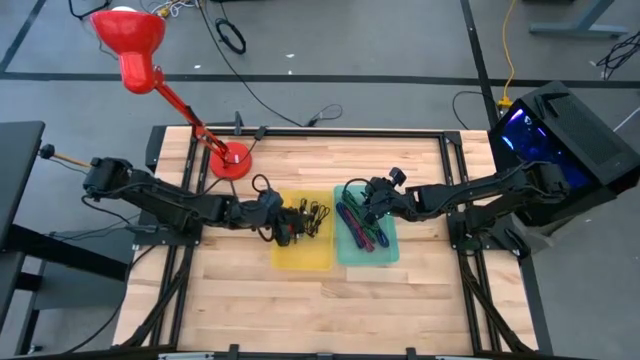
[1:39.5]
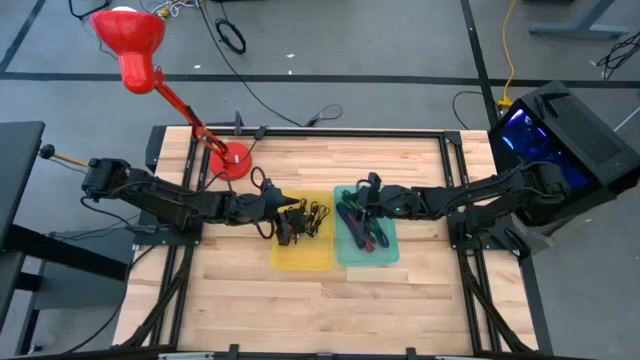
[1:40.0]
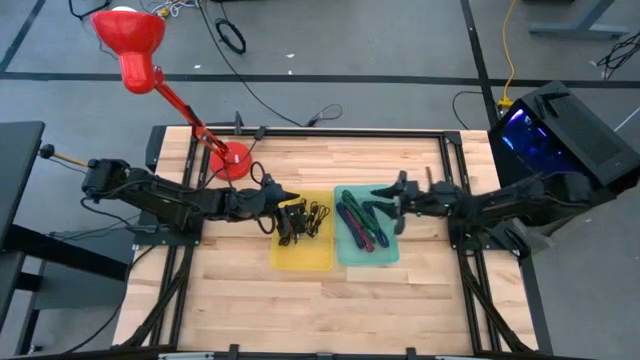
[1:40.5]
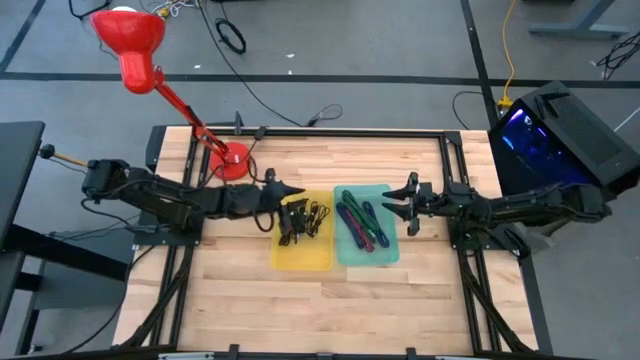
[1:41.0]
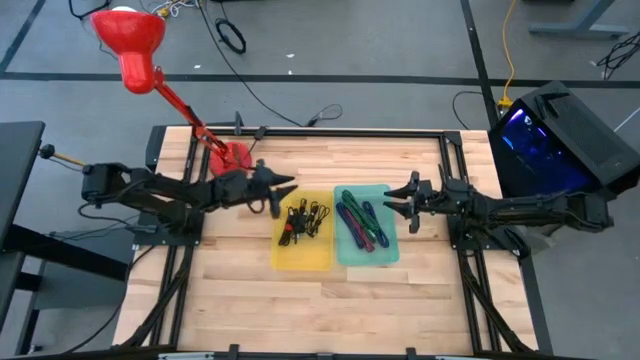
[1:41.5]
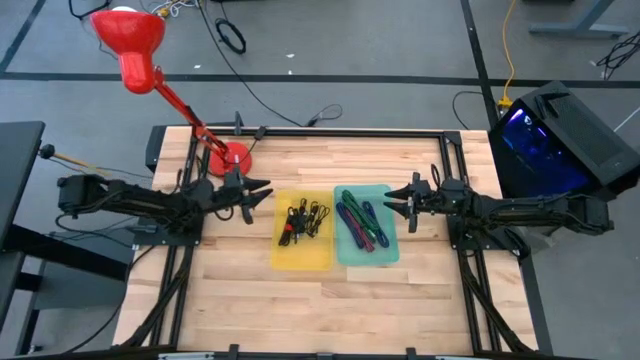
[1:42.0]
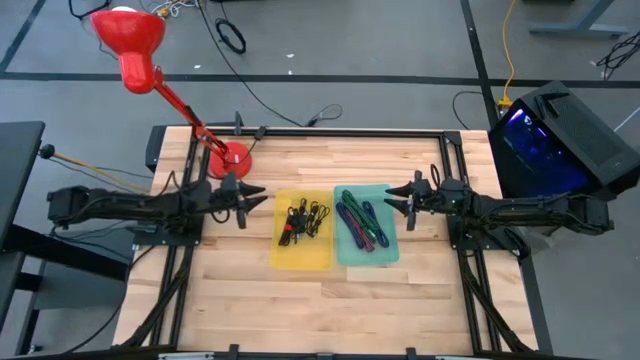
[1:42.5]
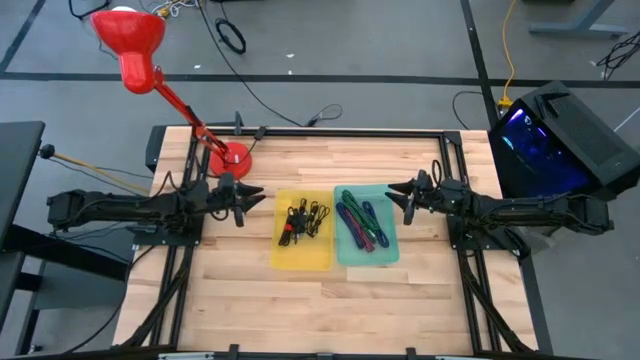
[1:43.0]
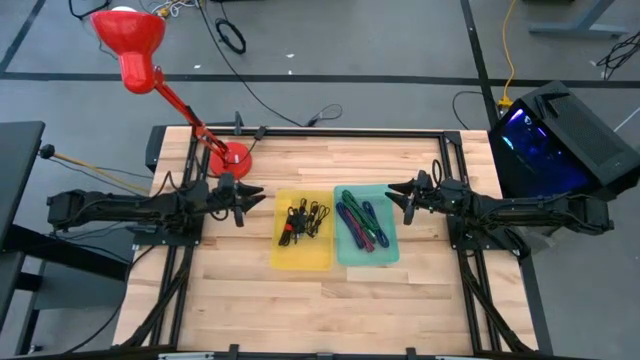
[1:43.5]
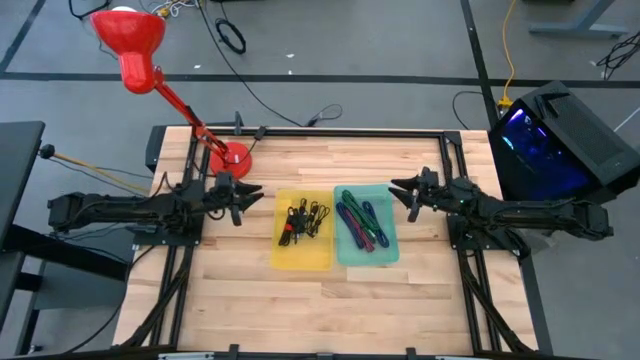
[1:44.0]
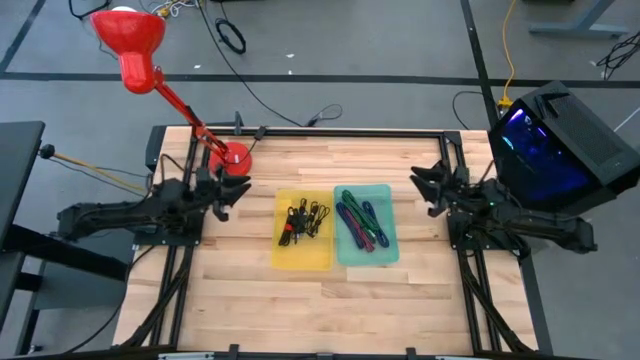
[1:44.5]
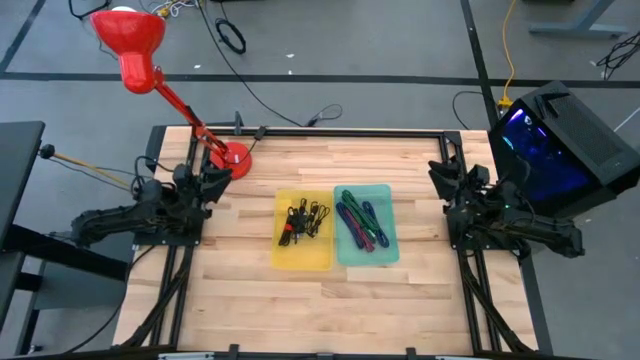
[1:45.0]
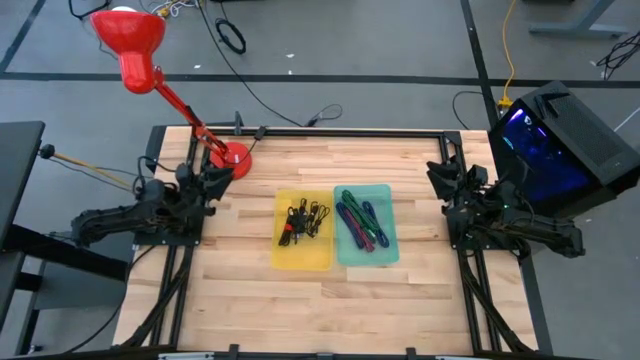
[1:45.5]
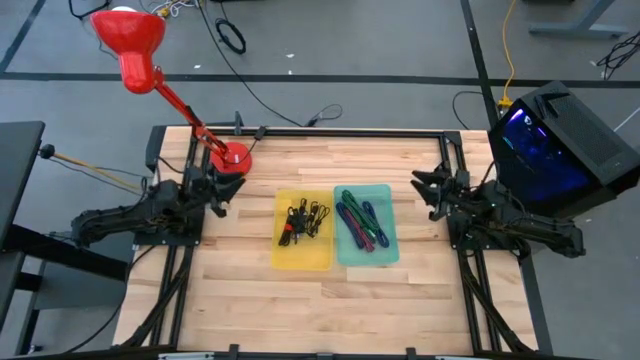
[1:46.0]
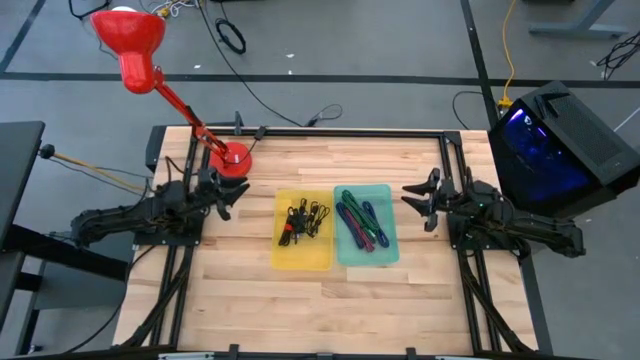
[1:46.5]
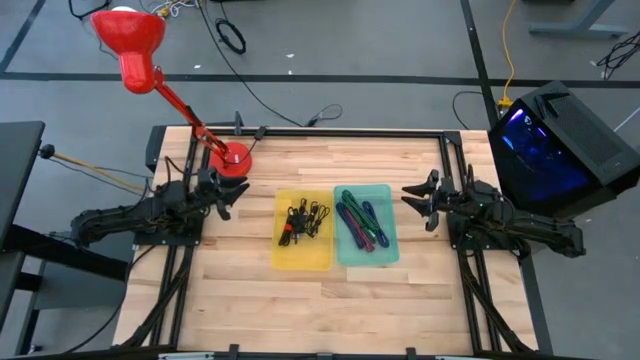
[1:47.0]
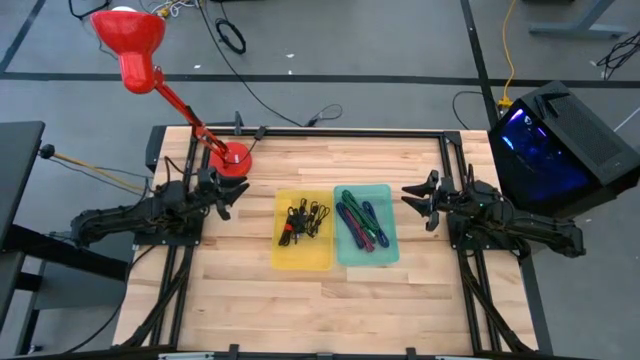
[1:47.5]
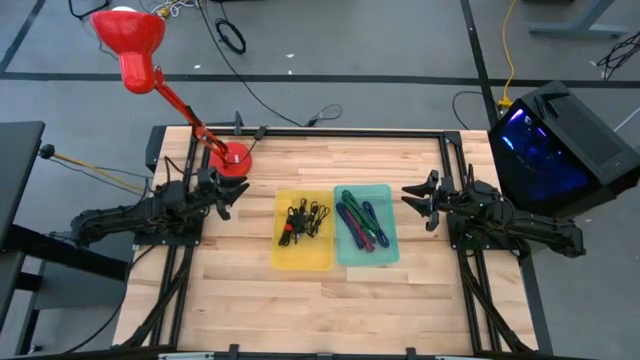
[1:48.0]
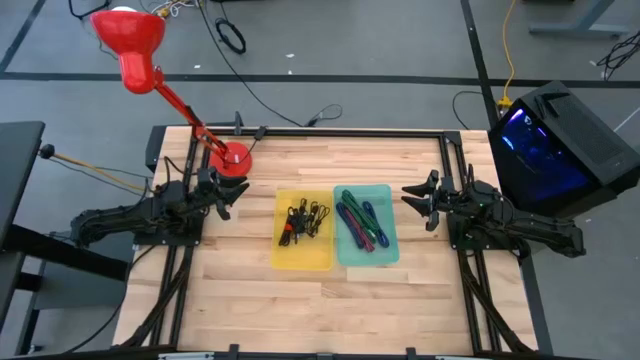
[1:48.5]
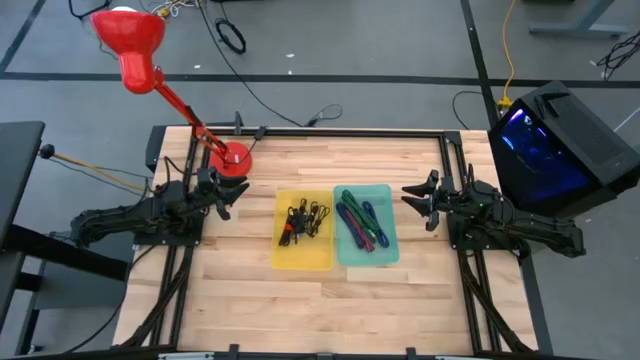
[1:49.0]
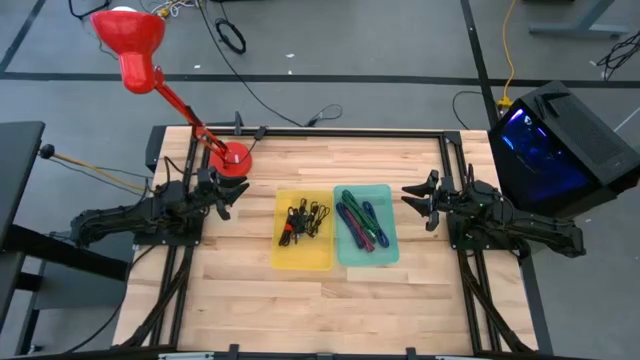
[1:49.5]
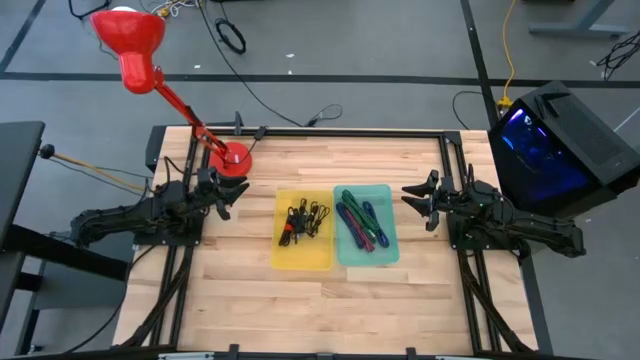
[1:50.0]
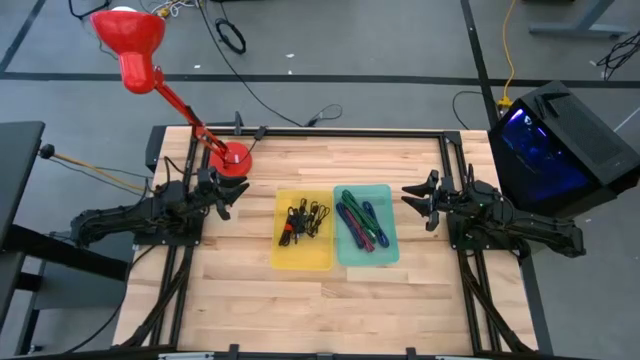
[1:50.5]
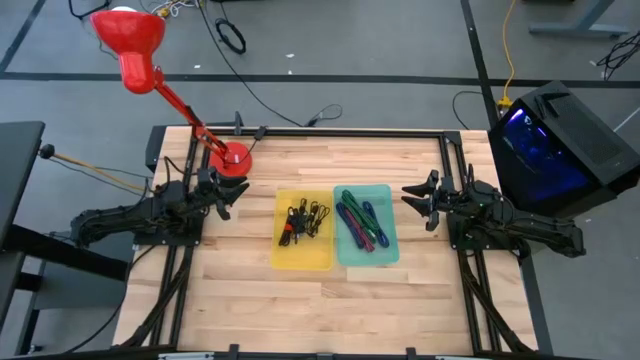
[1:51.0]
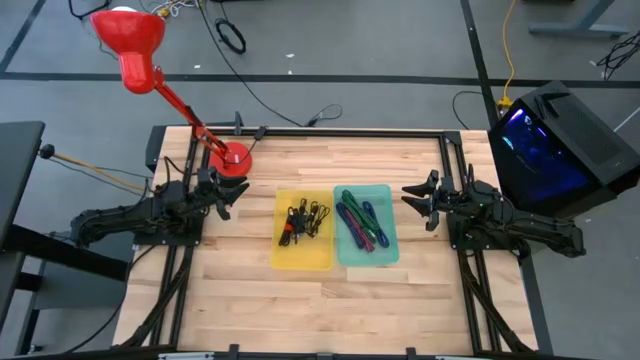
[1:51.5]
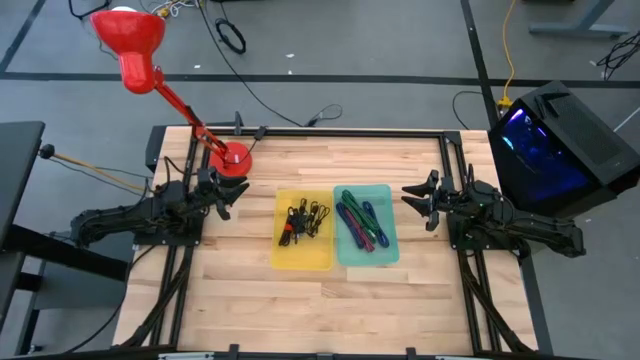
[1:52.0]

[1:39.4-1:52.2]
Task: Pick & Place USB Port
Return to Home Position
